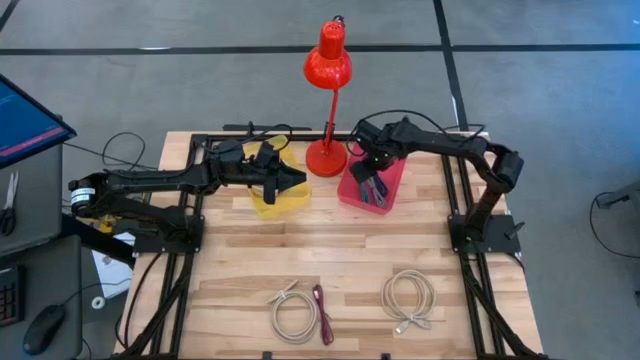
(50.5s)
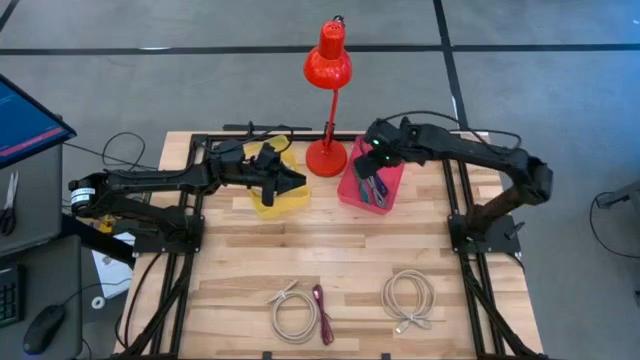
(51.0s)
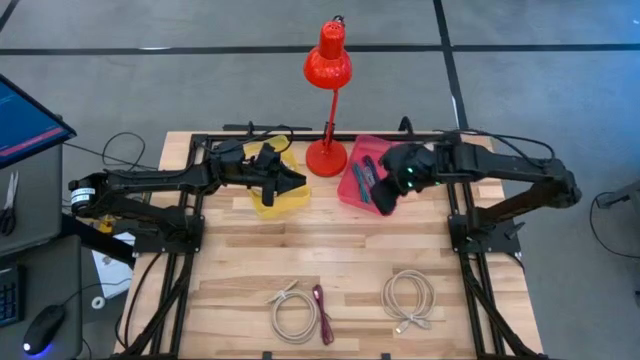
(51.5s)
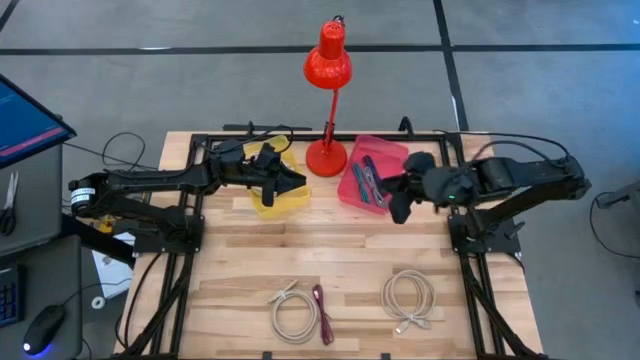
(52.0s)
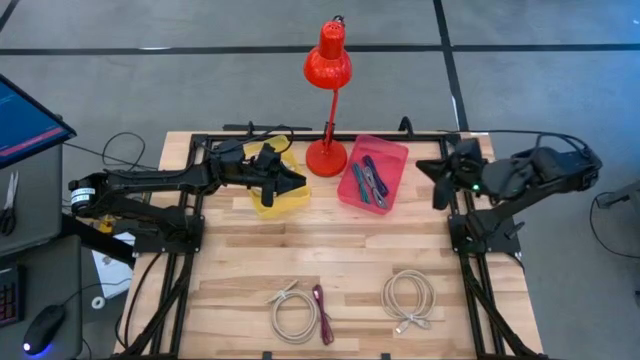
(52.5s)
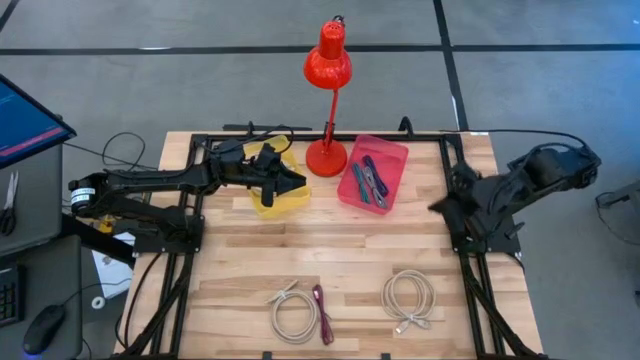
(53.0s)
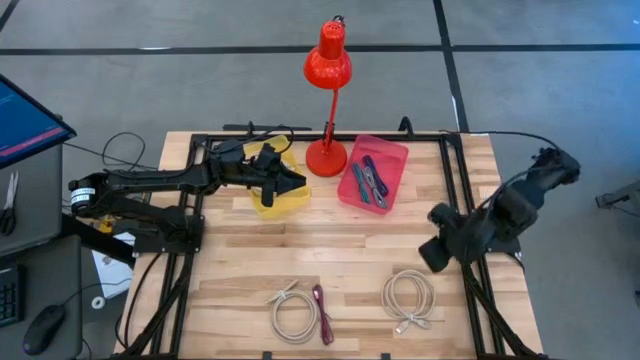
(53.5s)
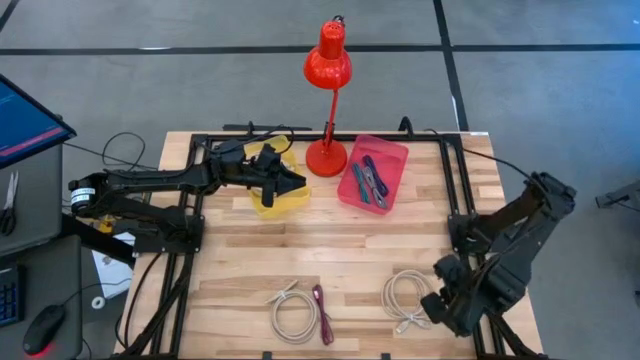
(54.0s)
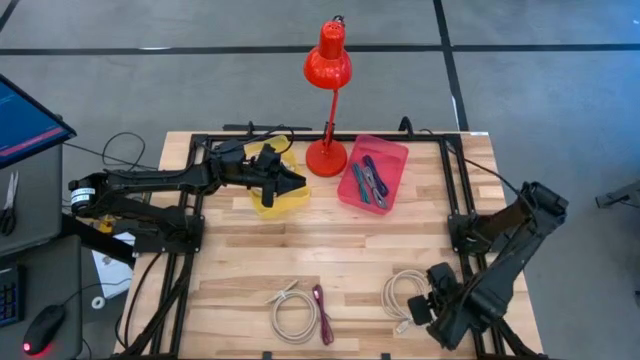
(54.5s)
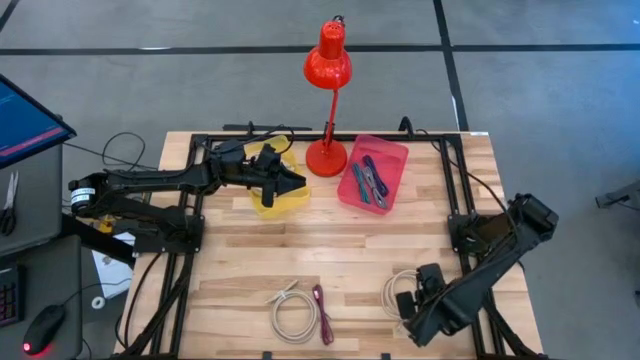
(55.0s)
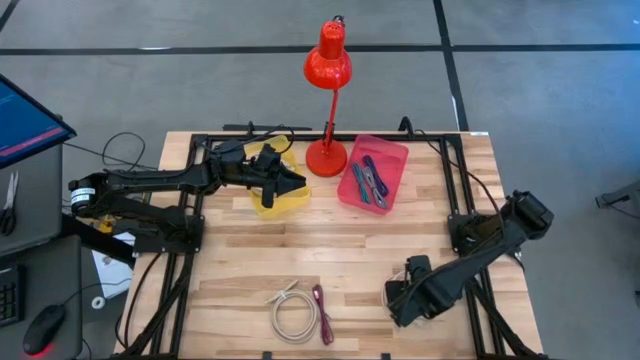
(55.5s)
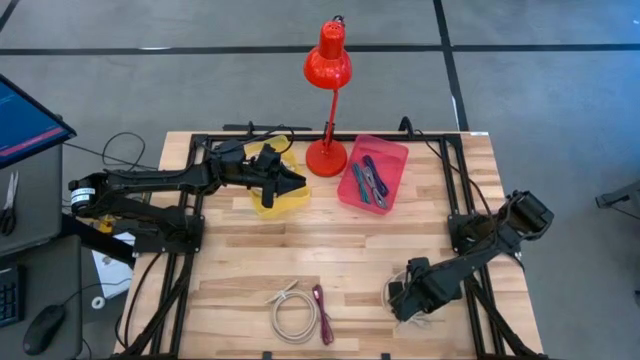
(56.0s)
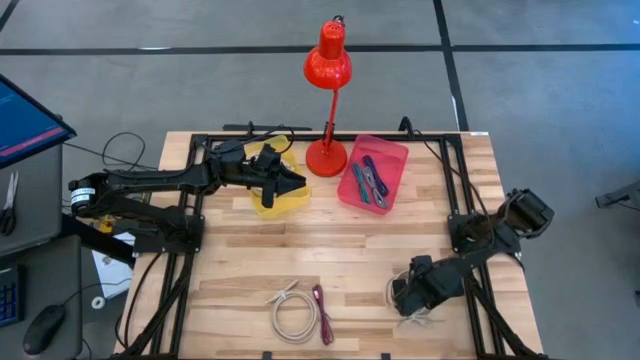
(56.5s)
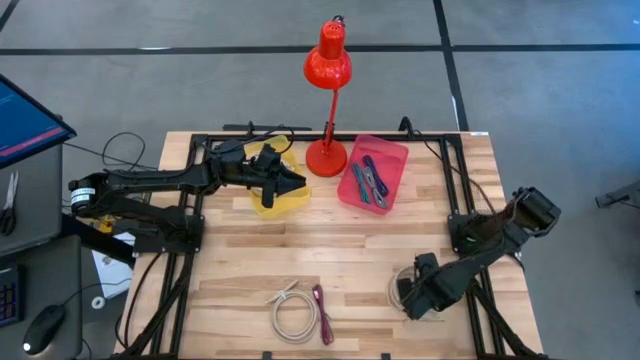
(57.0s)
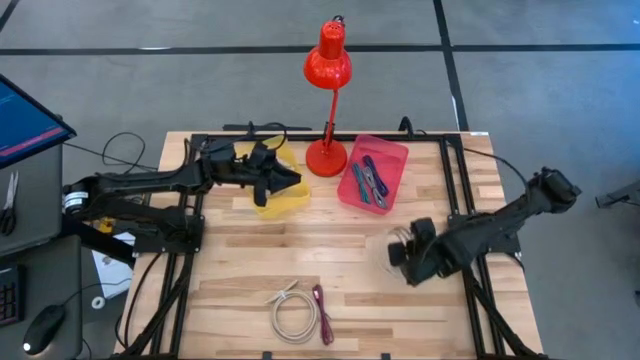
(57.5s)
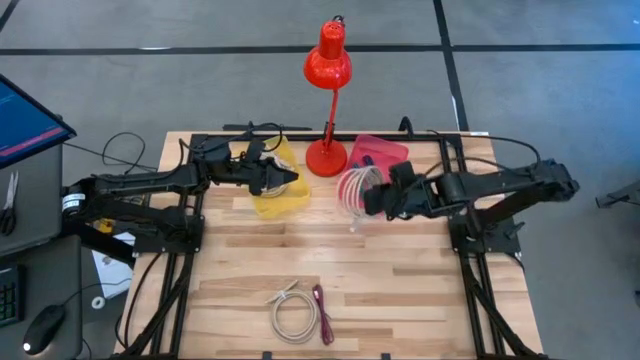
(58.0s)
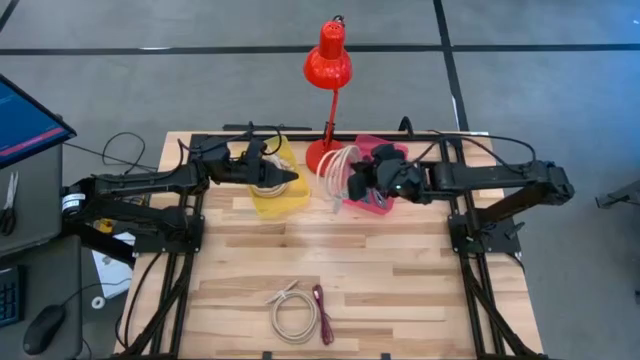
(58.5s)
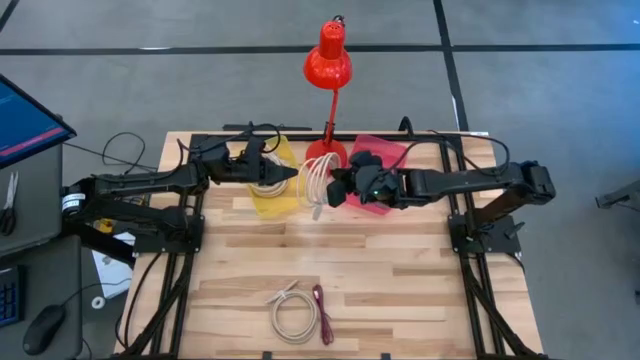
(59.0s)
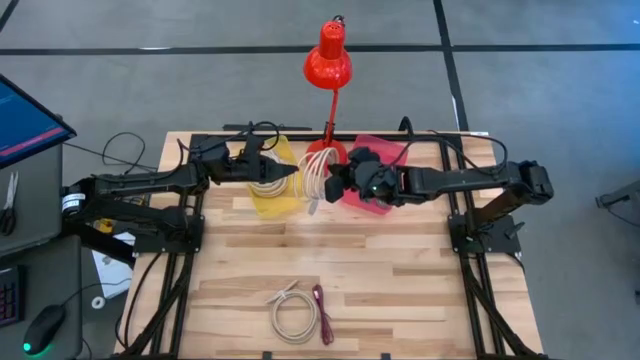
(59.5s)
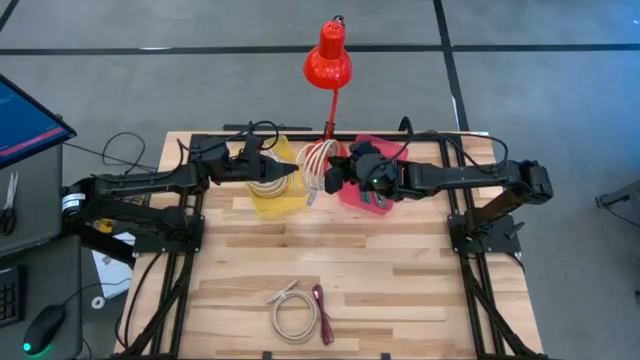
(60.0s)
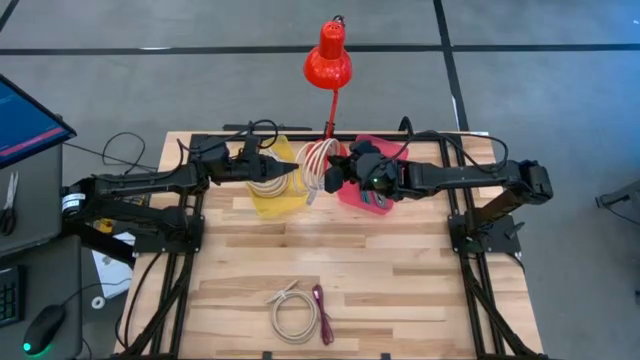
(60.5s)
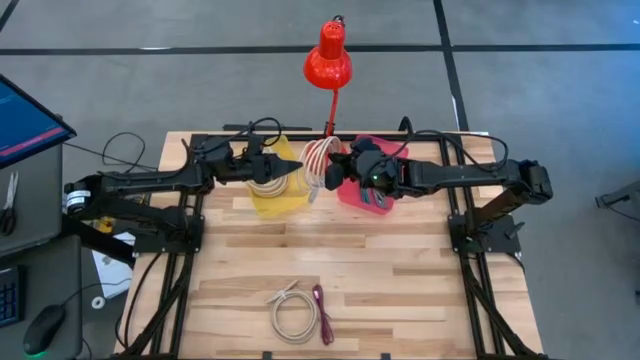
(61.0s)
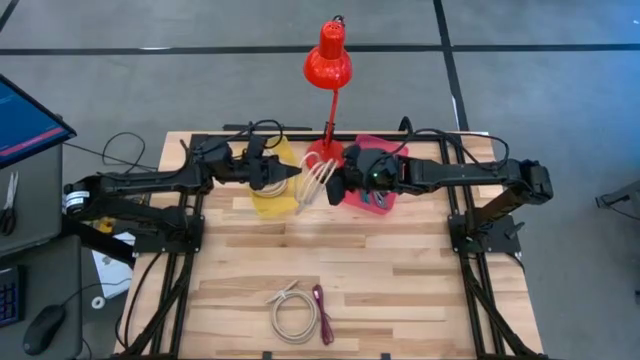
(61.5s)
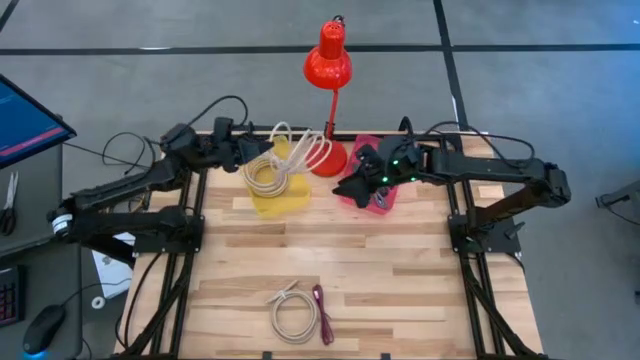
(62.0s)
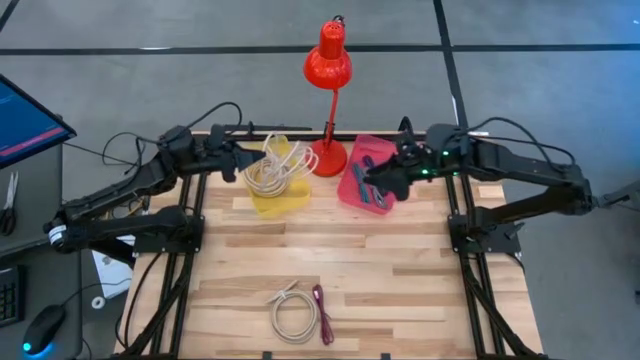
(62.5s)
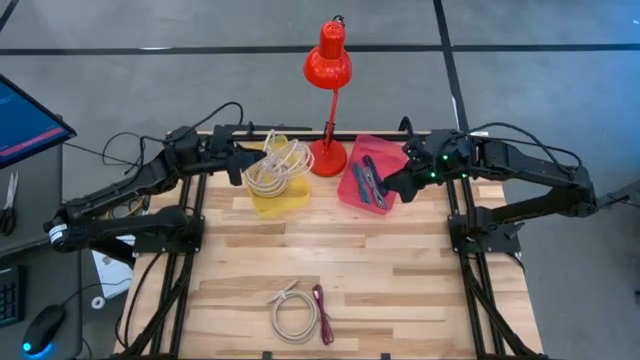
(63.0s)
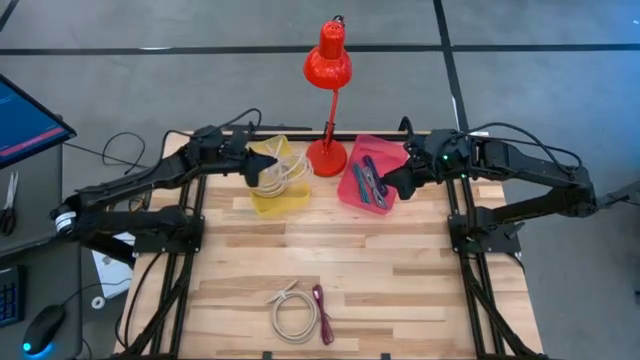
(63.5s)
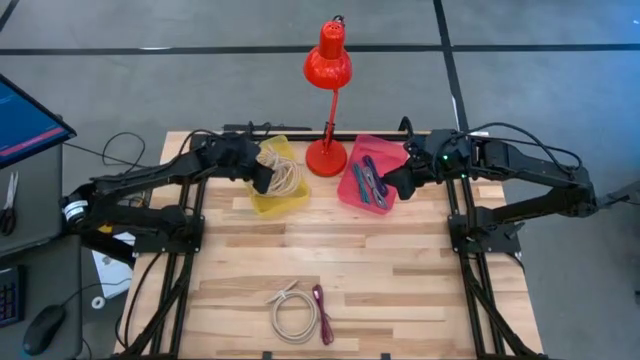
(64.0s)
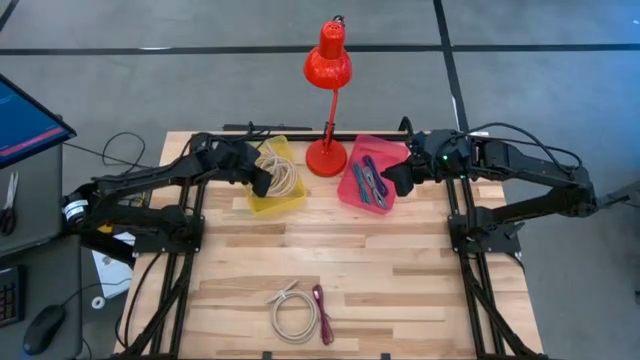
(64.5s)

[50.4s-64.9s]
Task: Pick & Place USB Port
Put the light brown USB cable into the yellow bin

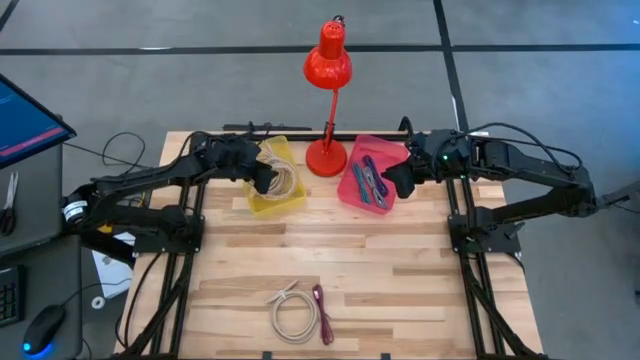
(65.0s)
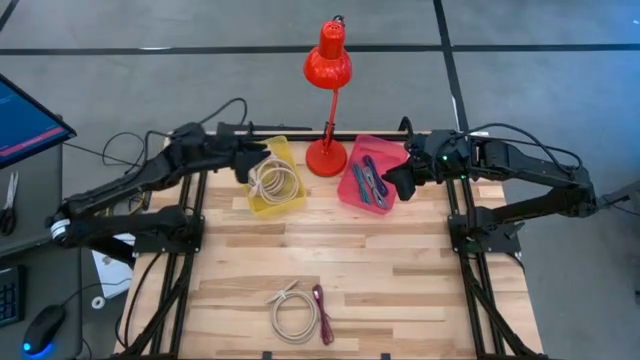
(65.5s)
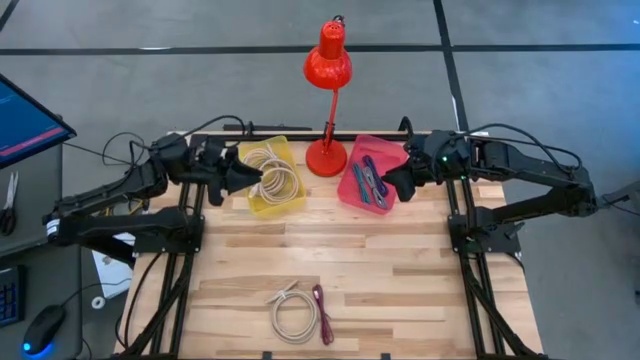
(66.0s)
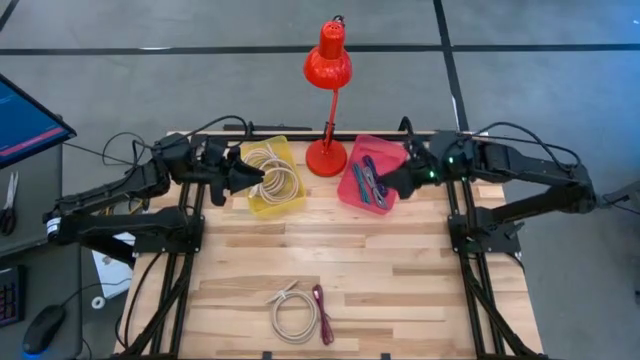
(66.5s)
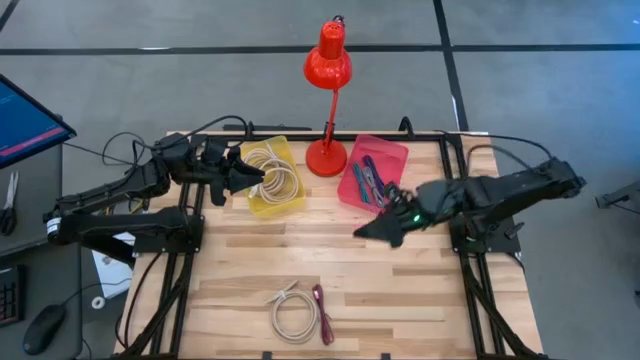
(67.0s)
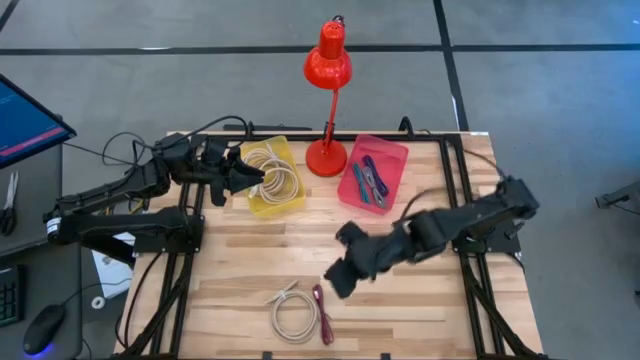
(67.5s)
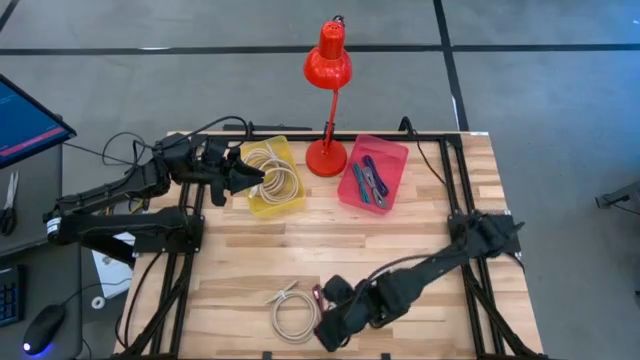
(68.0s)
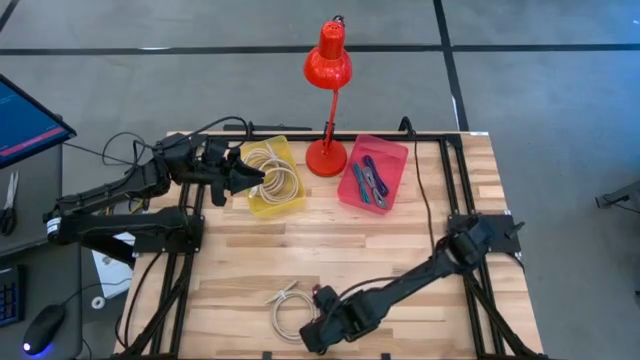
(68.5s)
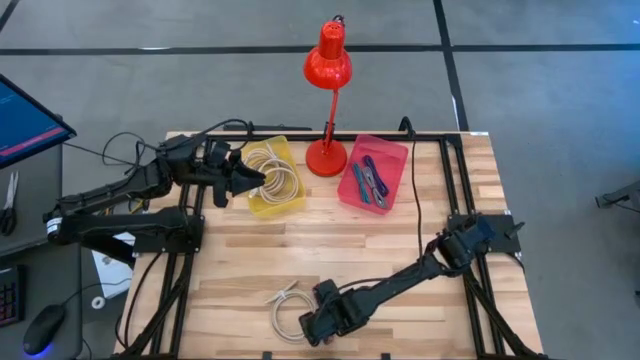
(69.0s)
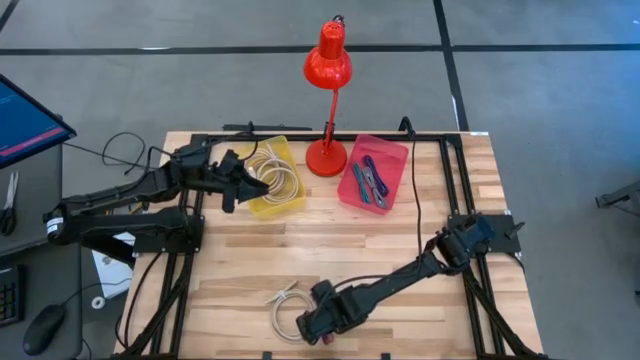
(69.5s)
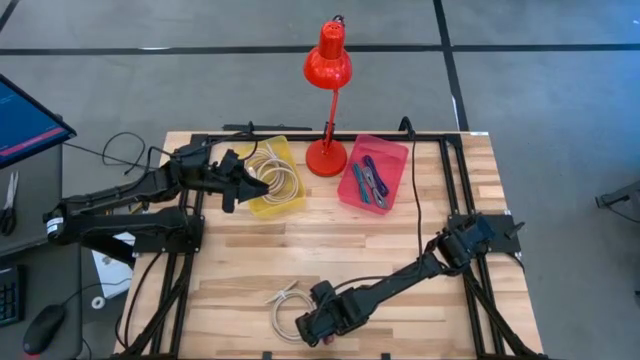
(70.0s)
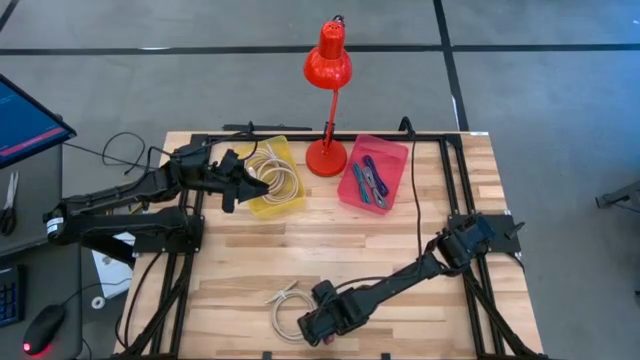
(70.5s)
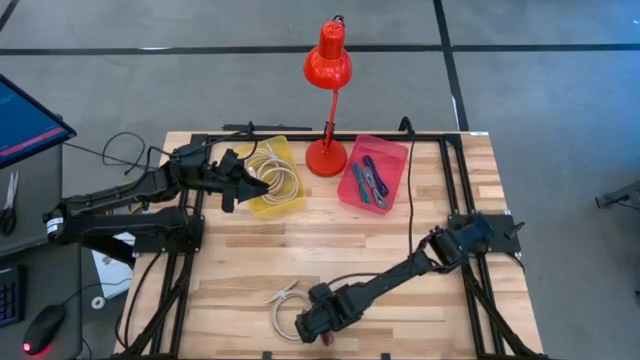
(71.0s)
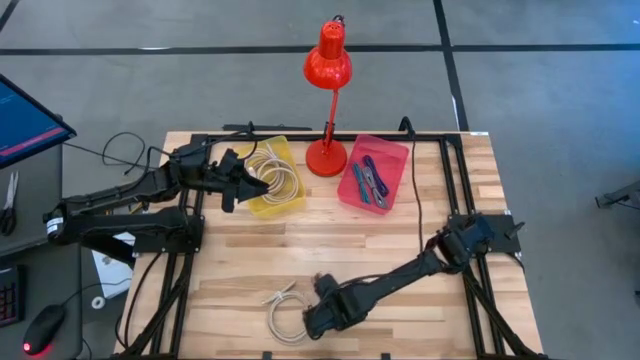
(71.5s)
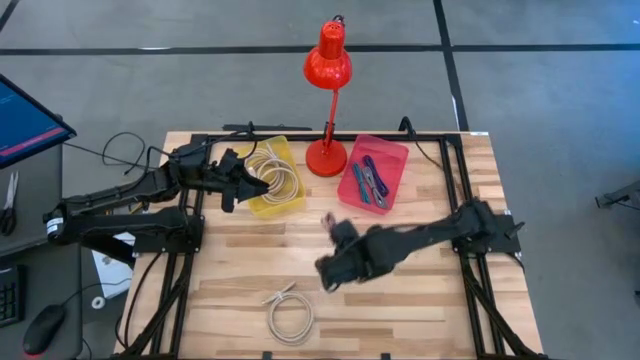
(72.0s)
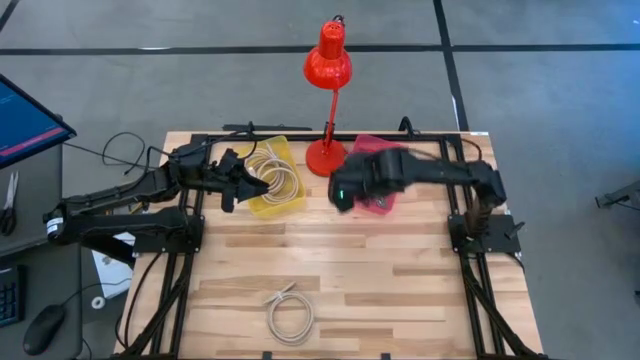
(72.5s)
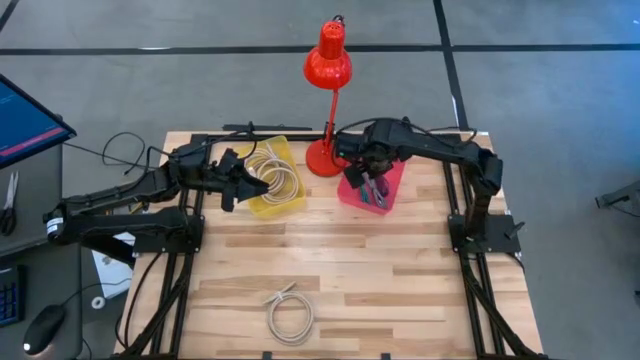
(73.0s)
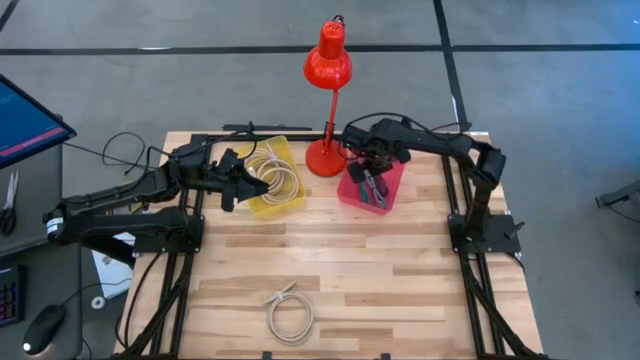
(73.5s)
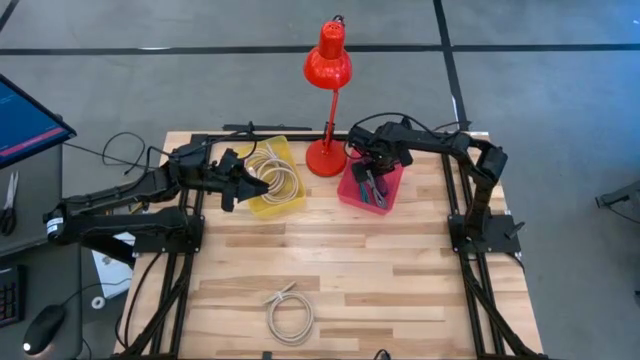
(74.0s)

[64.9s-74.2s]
Put the black and pink charger cable into the pink bin
